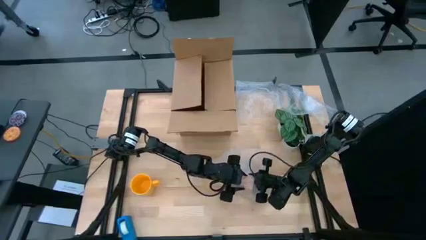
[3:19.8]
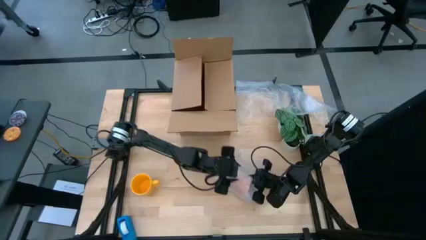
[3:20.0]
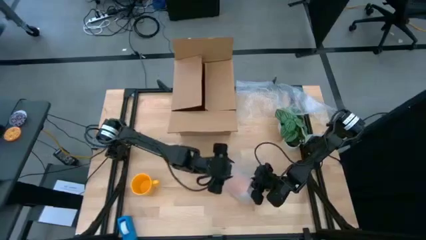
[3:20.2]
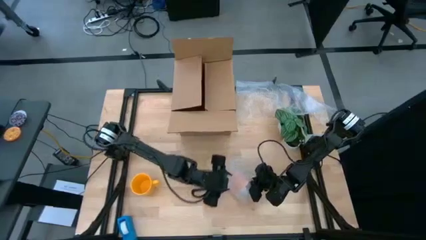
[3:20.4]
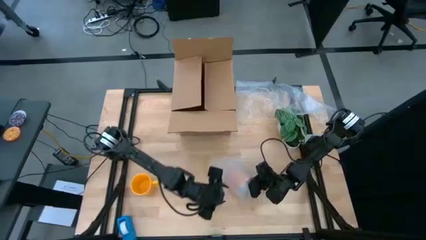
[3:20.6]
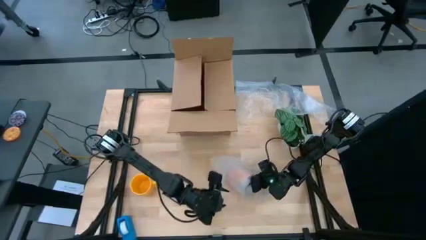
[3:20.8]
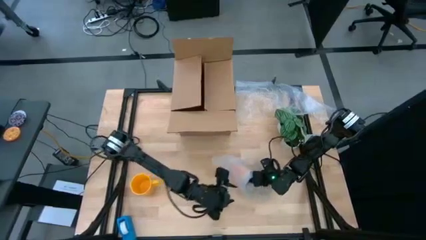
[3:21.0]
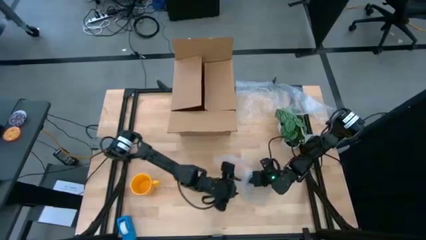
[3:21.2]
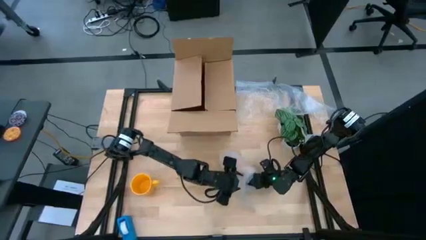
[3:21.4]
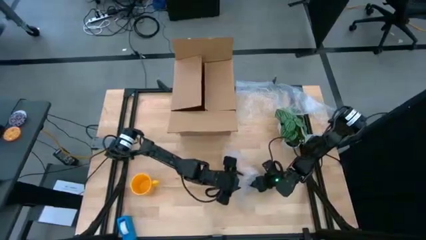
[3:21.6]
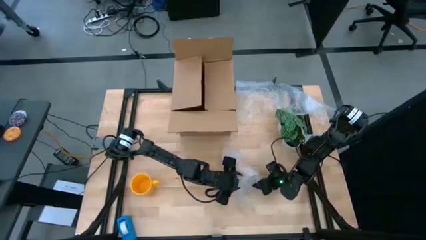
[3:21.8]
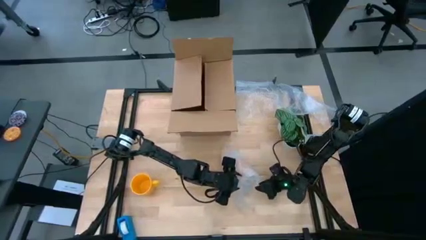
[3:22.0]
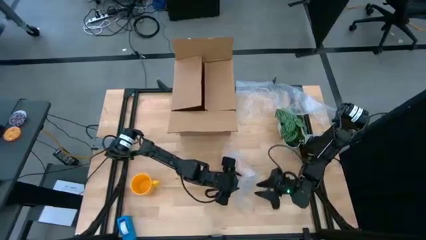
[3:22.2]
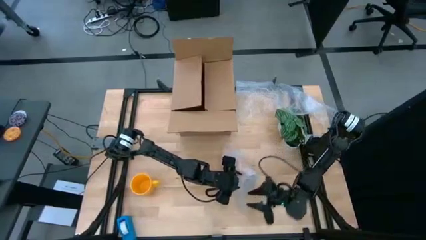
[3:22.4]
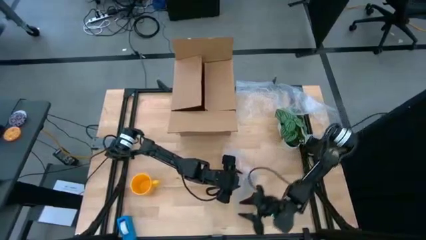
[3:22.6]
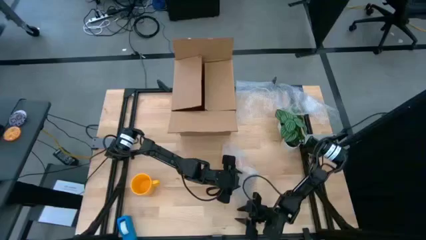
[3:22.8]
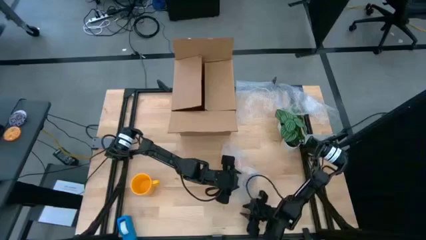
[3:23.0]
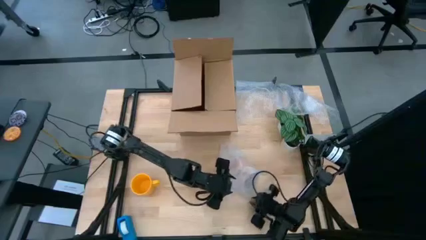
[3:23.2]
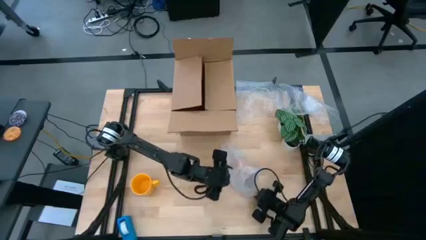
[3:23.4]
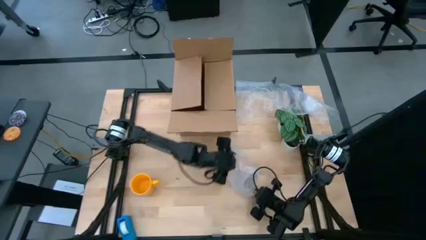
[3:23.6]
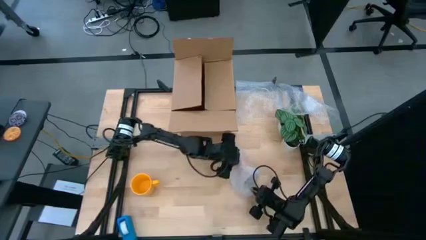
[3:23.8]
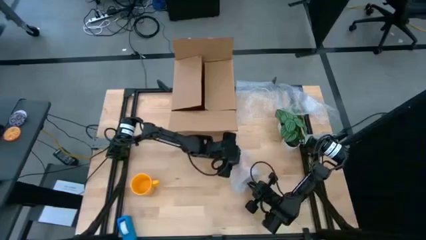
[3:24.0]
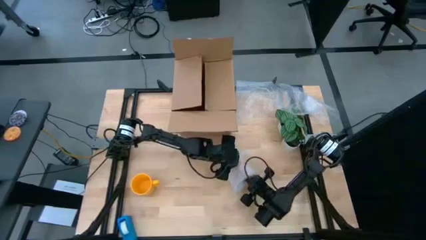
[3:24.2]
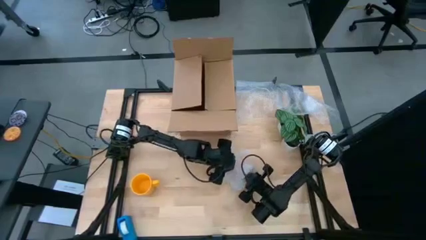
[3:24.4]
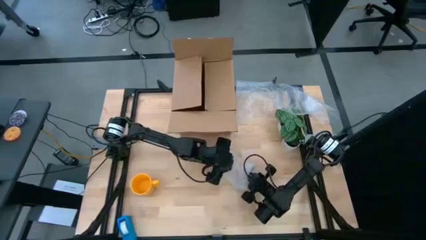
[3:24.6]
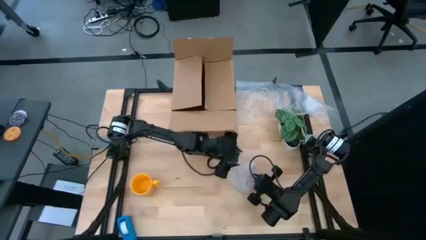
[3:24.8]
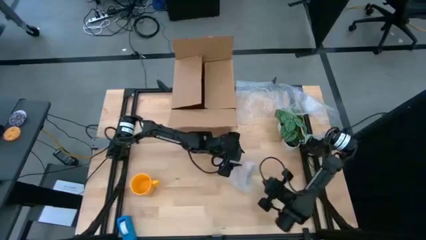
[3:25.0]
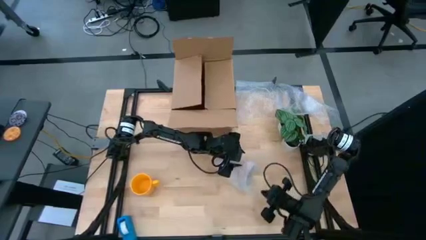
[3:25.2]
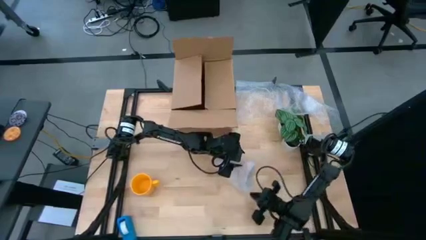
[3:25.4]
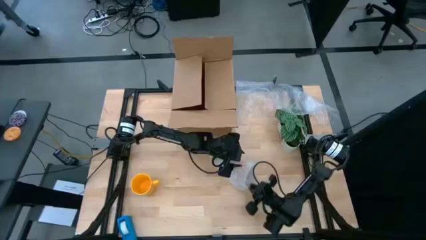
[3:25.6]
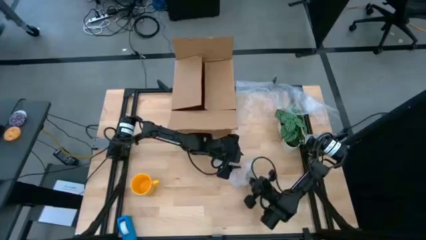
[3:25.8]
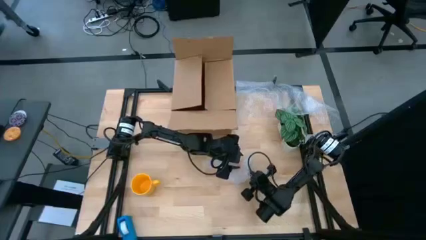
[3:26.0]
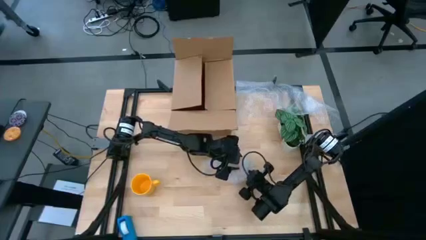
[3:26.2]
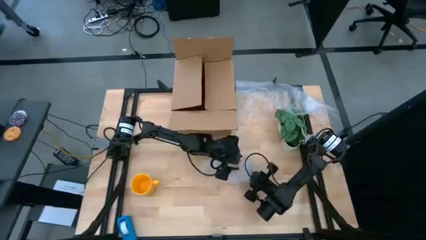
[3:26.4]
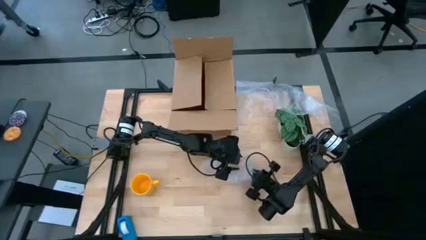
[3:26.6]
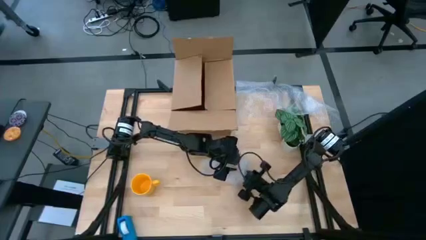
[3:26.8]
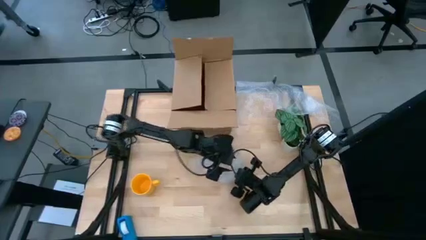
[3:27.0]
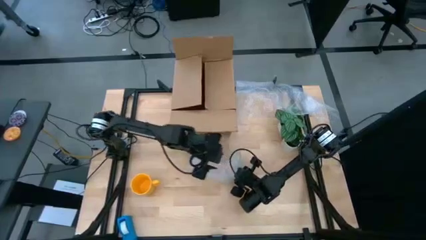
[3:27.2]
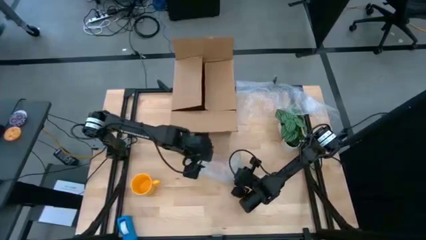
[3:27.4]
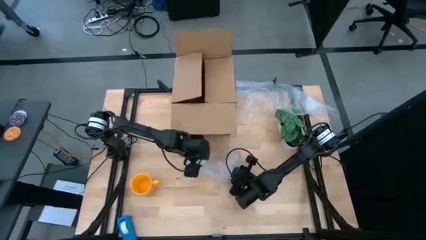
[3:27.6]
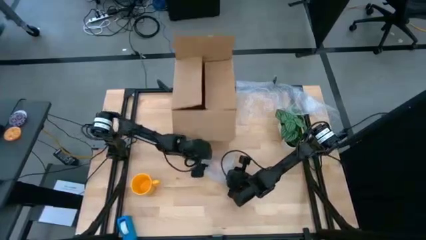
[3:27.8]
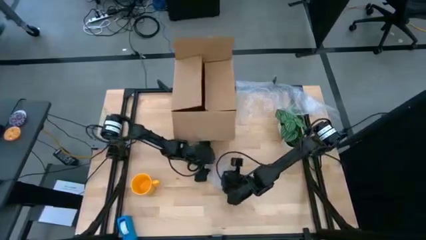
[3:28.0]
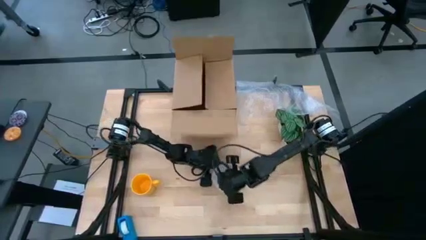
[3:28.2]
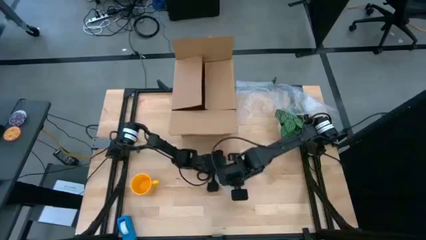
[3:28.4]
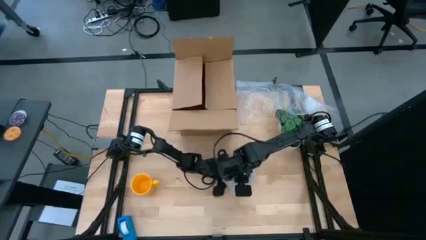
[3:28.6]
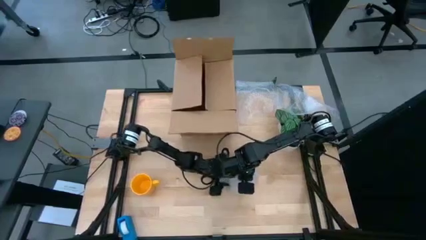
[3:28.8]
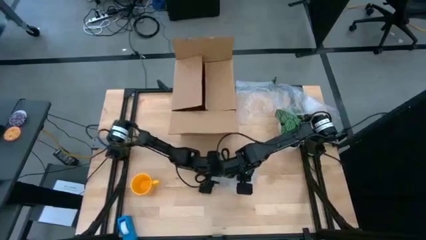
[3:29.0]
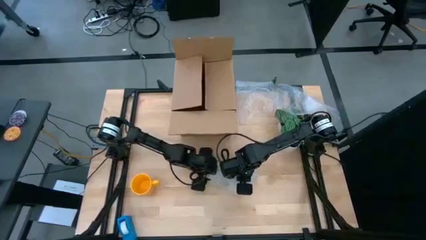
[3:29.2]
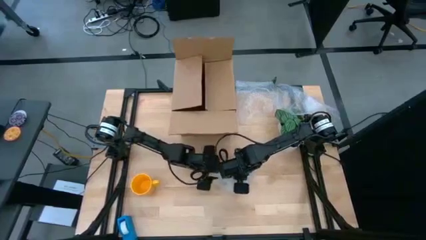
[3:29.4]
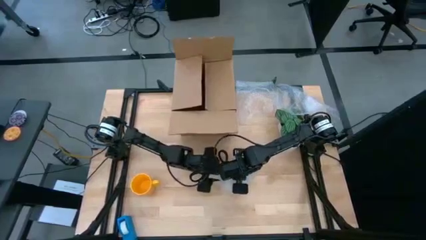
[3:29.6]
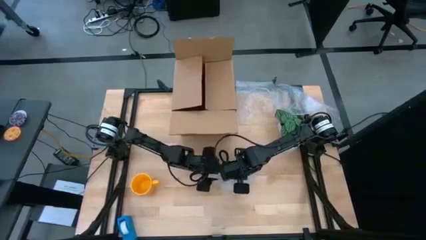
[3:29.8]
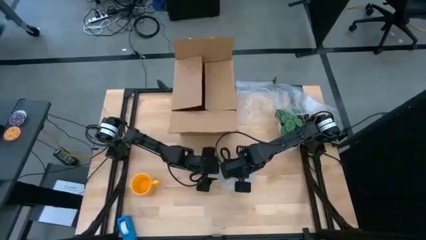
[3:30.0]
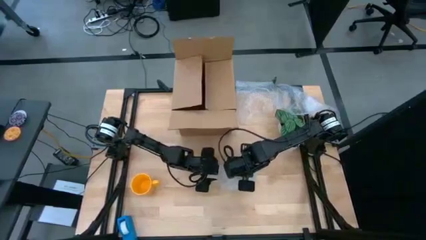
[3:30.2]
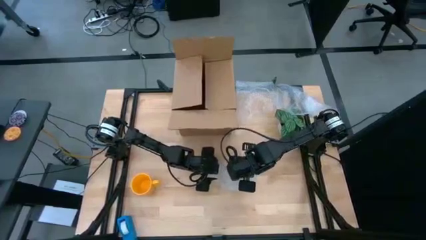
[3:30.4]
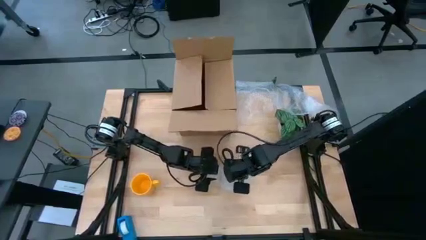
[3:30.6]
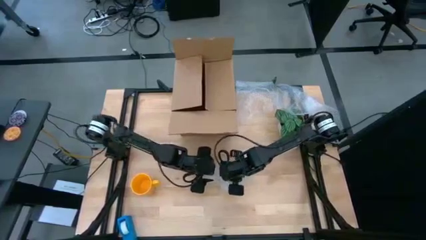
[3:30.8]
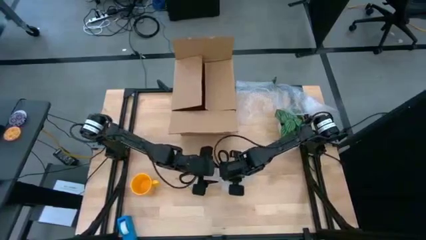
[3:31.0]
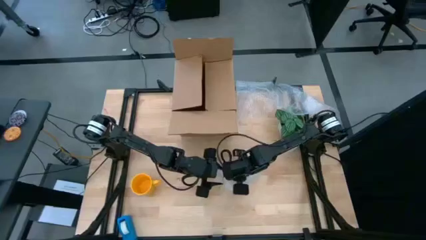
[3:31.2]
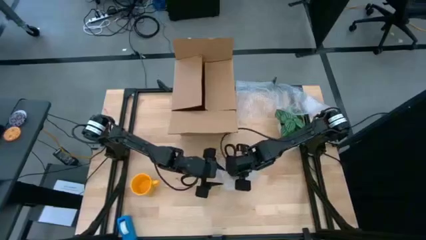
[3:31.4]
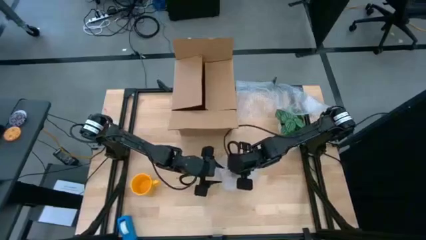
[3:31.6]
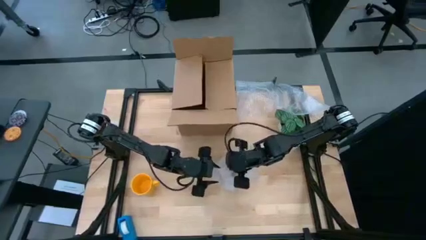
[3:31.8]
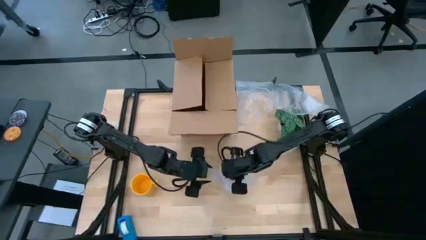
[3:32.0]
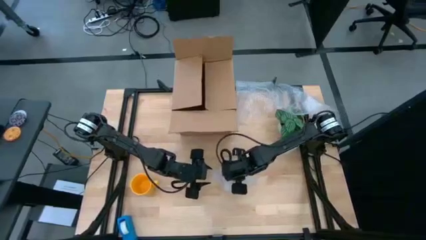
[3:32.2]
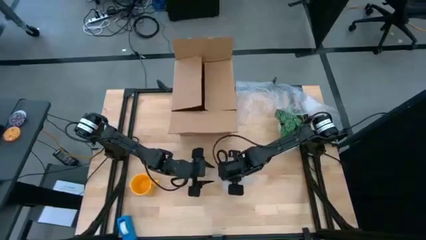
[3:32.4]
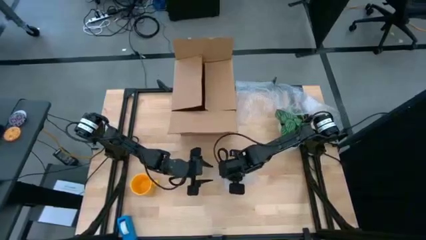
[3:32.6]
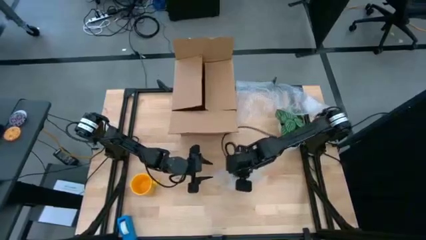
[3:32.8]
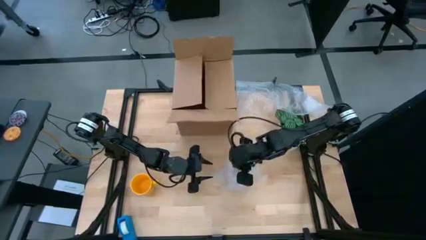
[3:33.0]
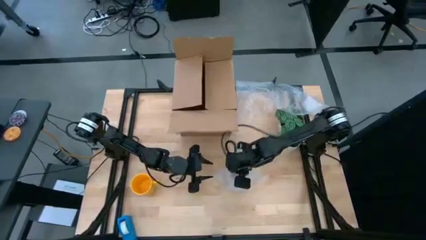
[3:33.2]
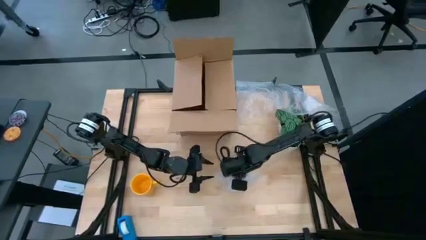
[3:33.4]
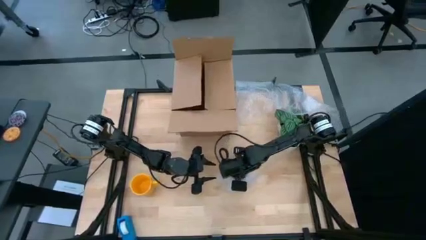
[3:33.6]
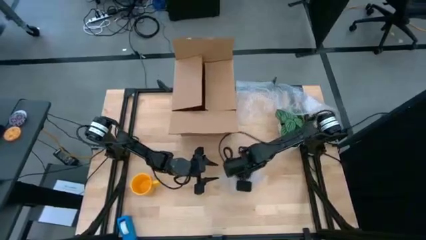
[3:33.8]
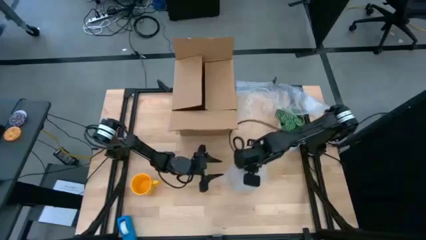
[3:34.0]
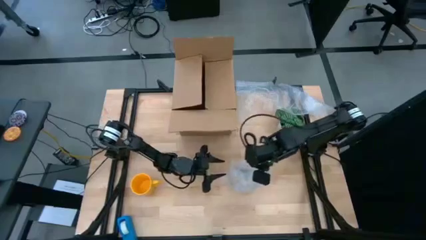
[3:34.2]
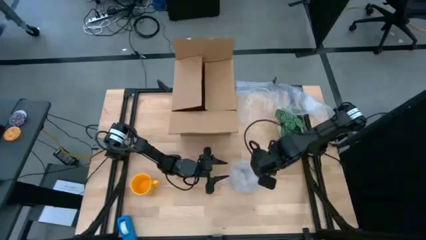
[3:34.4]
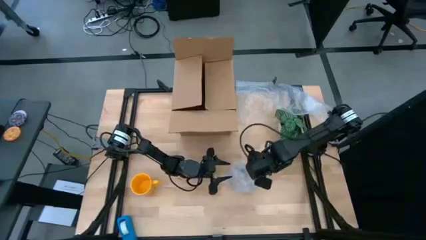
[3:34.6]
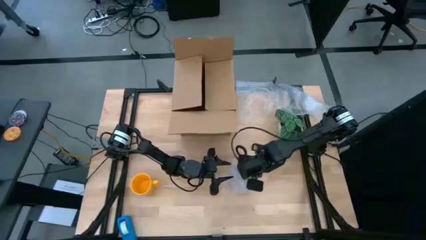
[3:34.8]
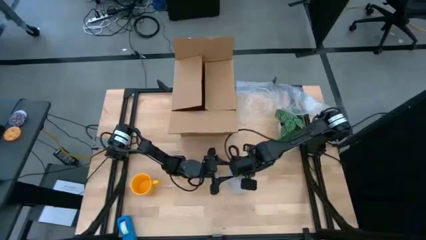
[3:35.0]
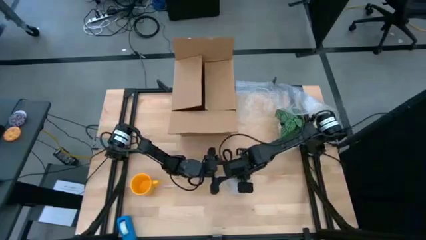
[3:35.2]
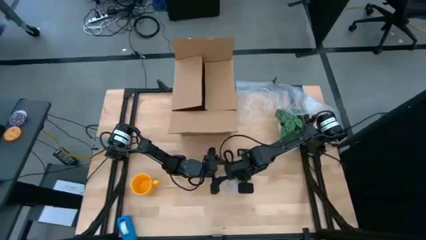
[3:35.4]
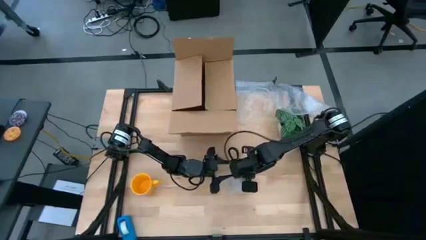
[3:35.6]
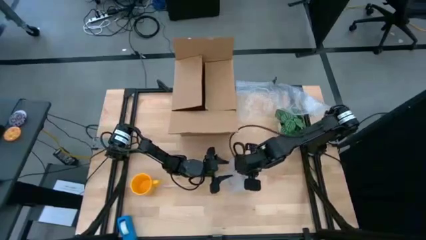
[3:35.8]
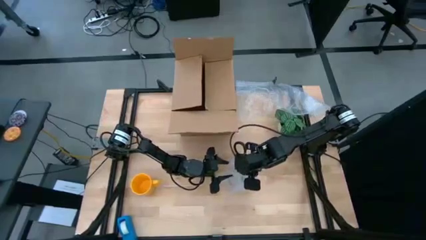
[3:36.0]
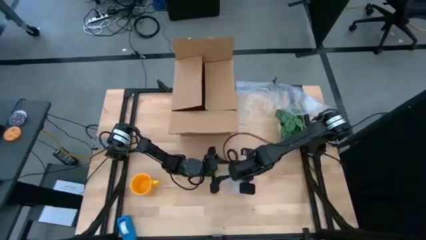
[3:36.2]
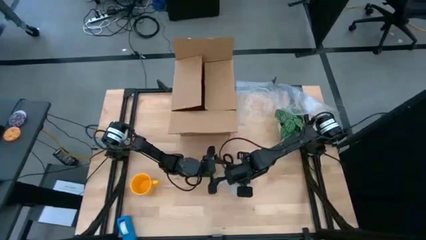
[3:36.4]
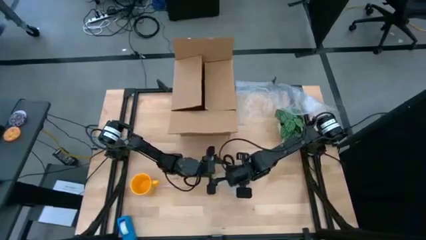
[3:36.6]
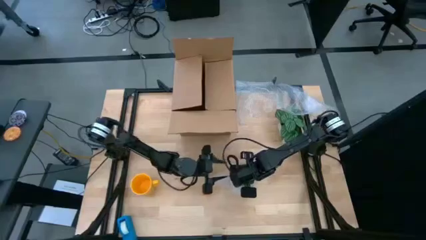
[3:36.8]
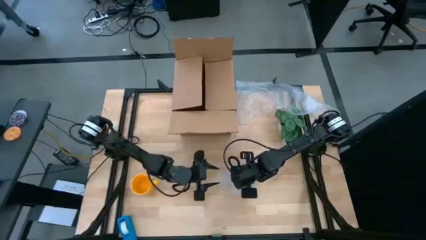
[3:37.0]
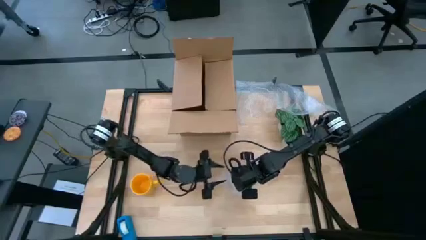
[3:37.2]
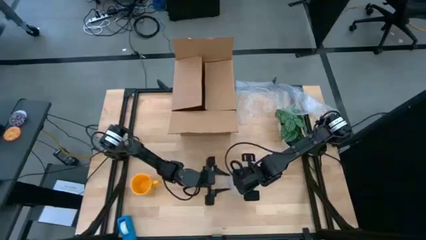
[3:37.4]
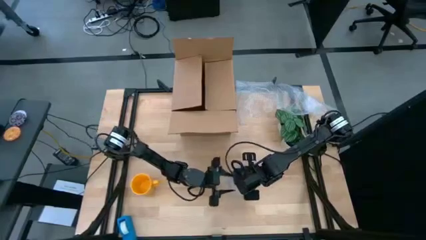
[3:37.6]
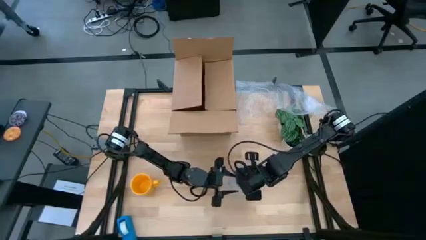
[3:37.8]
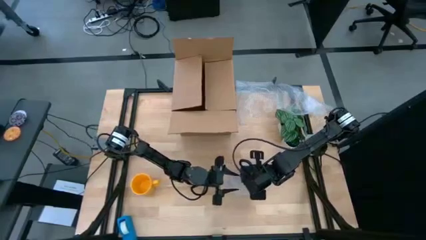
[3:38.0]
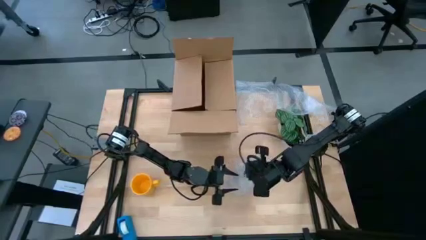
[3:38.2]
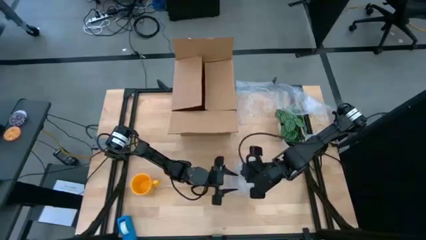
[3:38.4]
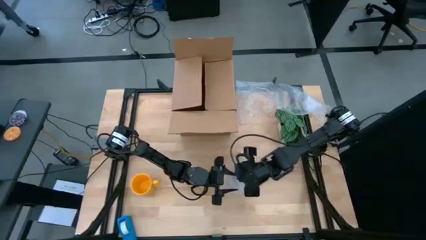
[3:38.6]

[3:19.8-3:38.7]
Task: wrap mug
Wrap the orange cup with the bubble wrap
